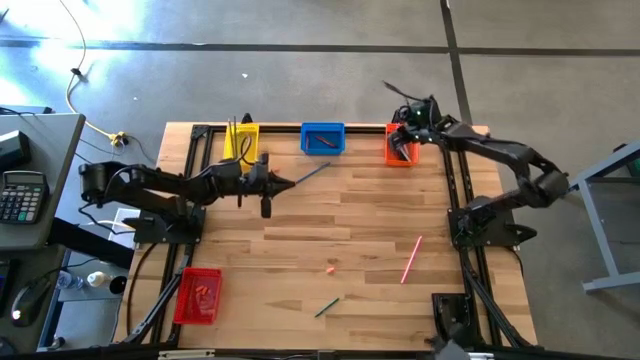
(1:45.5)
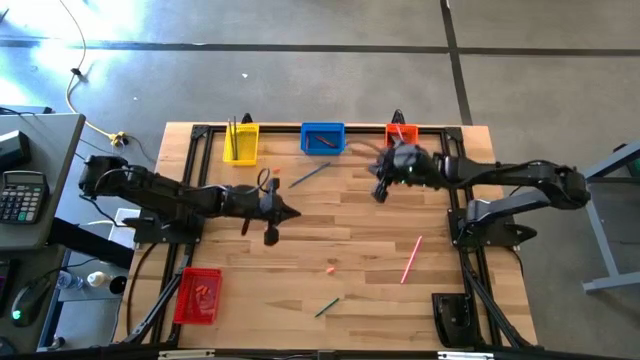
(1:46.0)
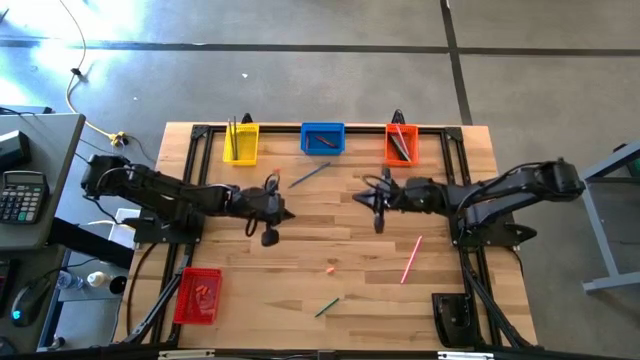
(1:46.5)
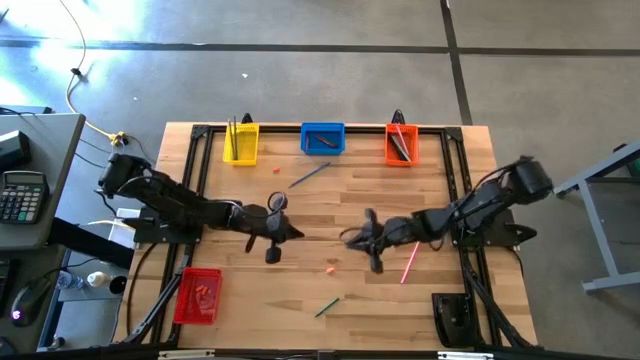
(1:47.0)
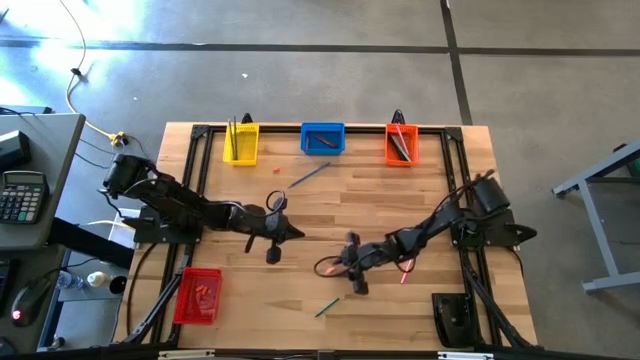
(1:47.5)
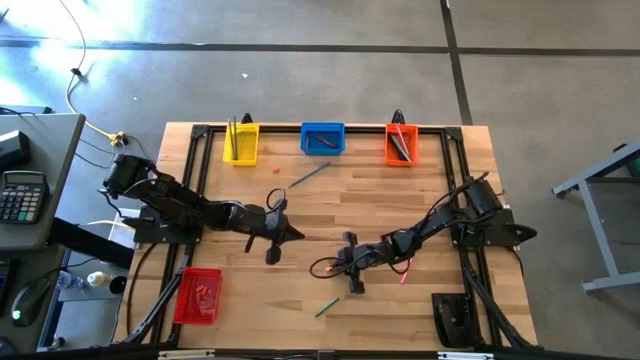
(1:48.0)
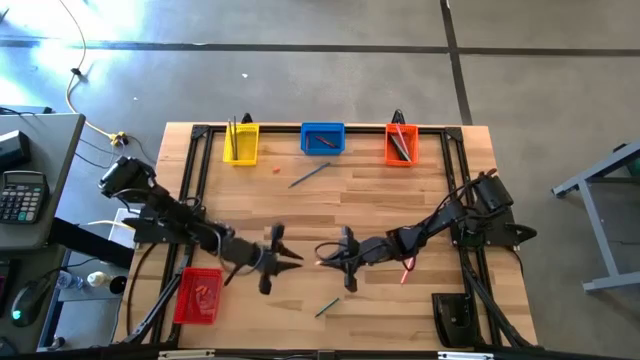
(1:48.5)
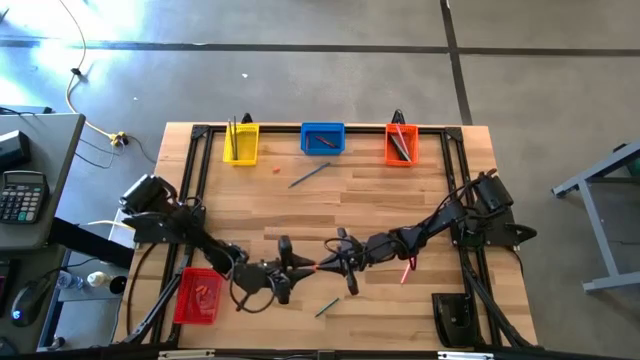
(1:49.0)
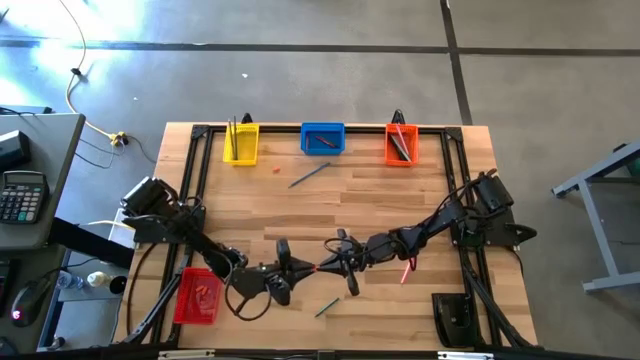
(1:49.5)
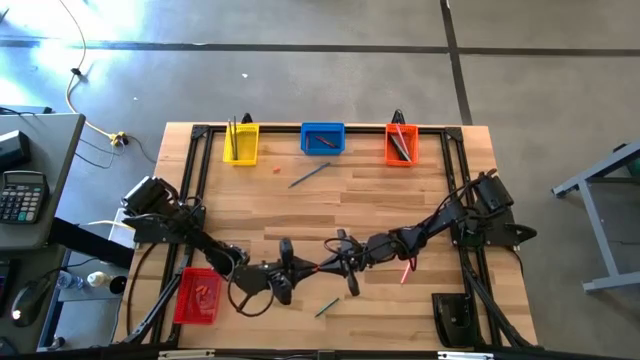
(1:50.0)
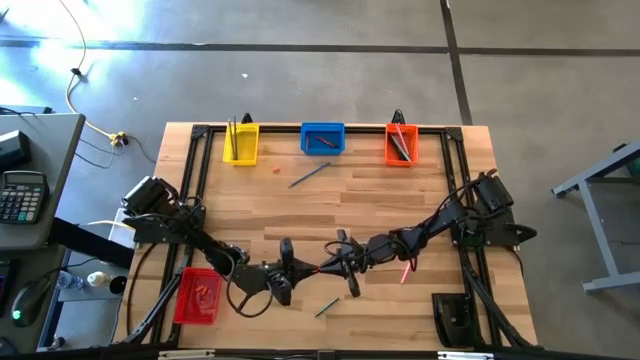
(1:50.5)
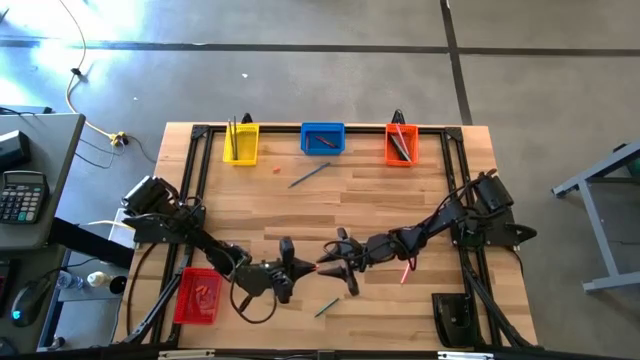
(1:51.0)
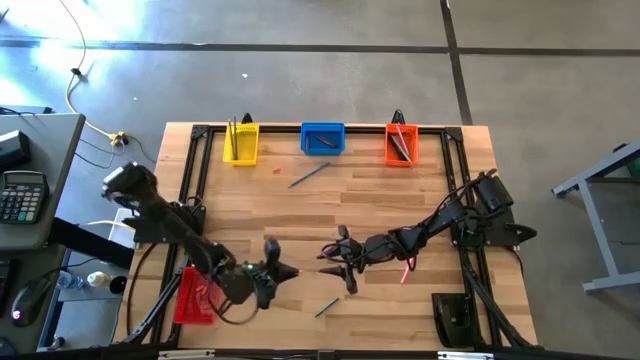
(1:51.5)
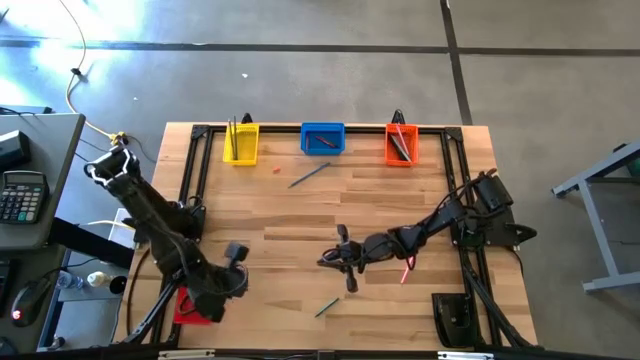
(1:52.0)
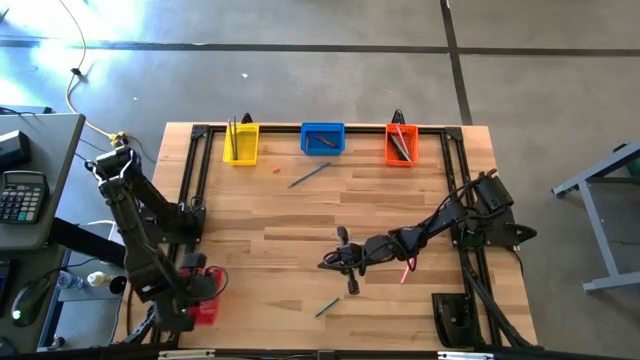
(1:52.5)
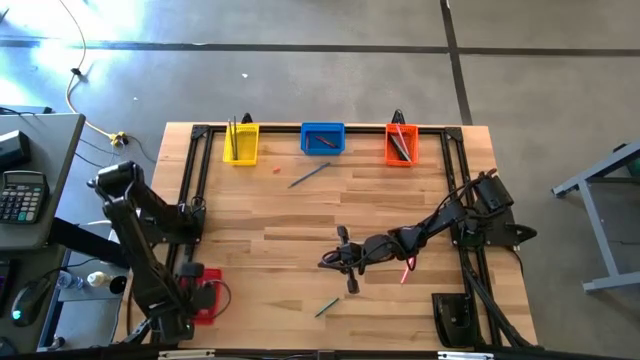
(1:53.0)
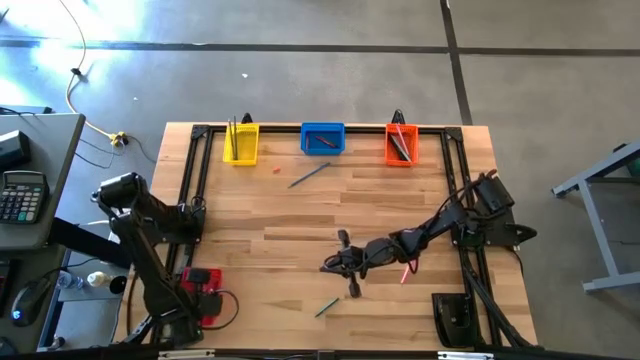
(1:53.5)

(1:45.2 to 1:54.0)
Task: Sort crayons/erasers/pens/pencils in bins
Put the orange eraser into the red bin

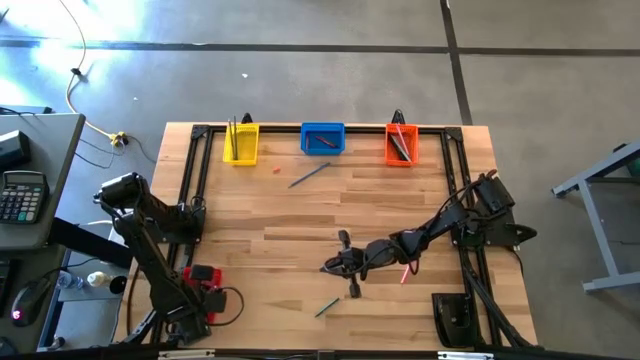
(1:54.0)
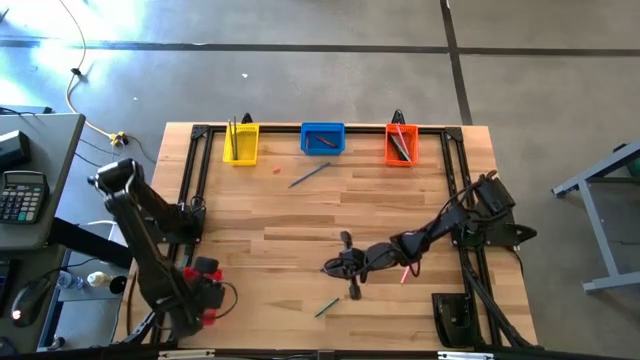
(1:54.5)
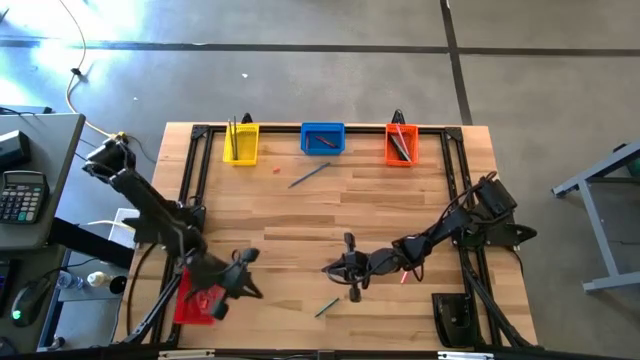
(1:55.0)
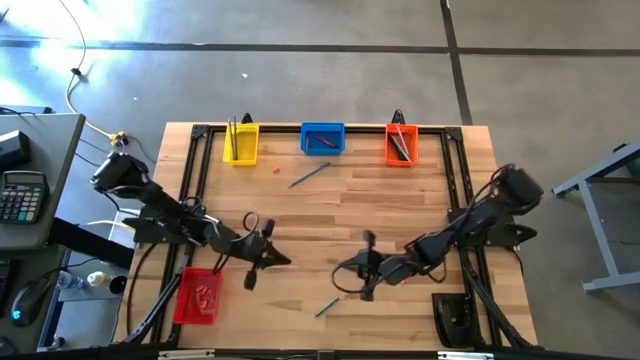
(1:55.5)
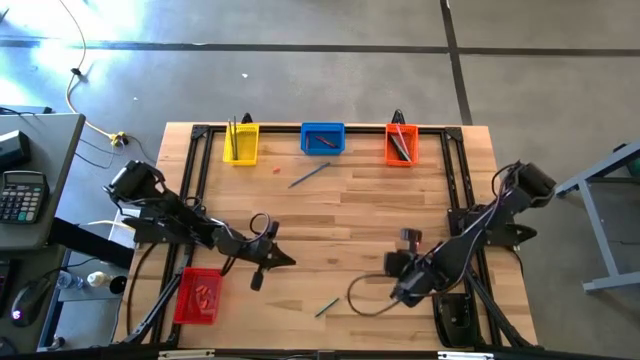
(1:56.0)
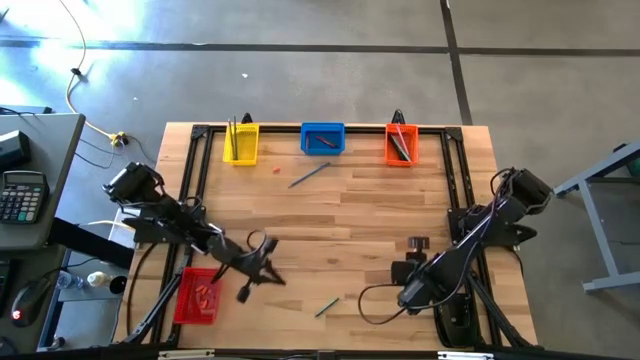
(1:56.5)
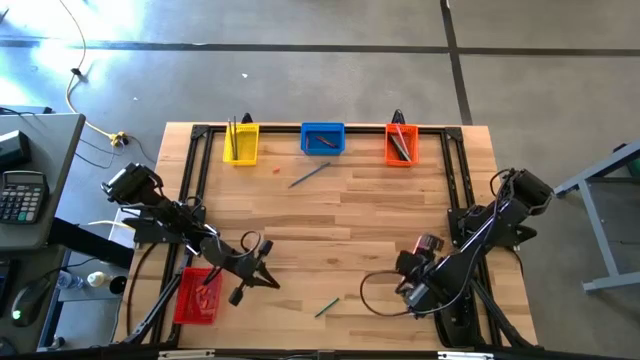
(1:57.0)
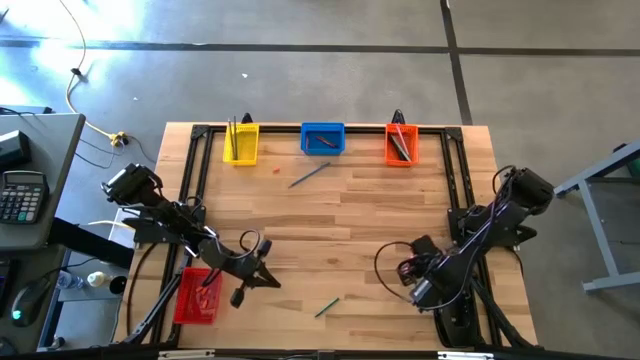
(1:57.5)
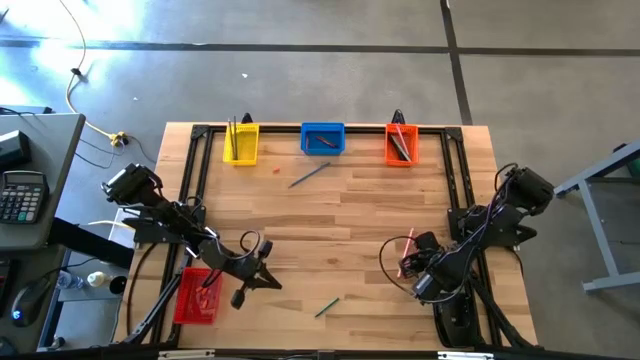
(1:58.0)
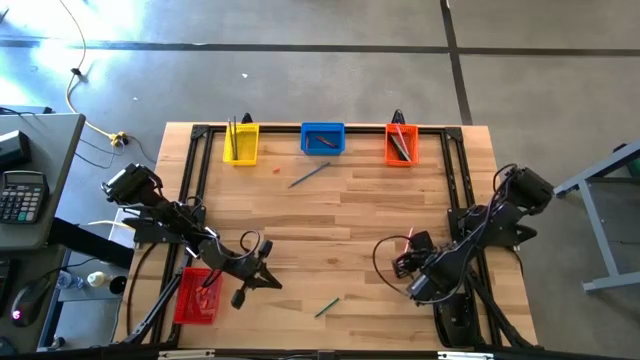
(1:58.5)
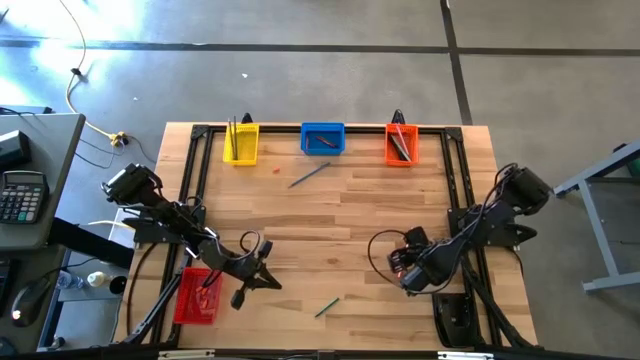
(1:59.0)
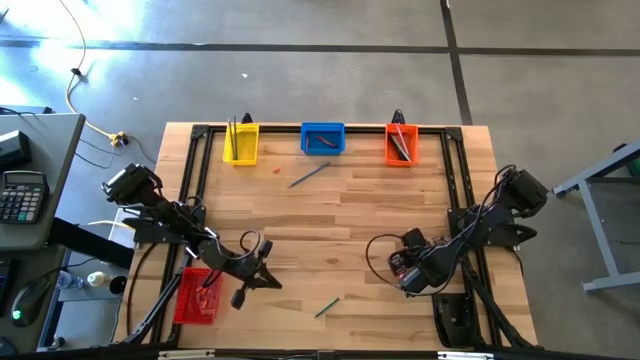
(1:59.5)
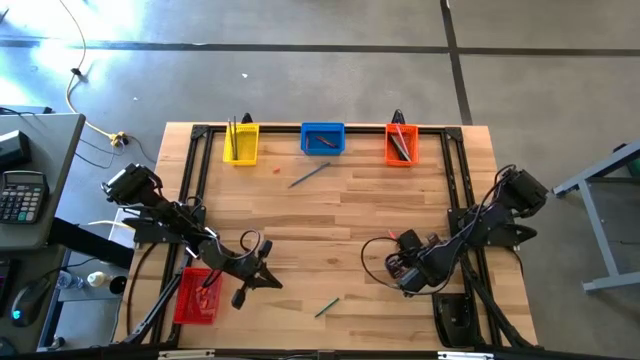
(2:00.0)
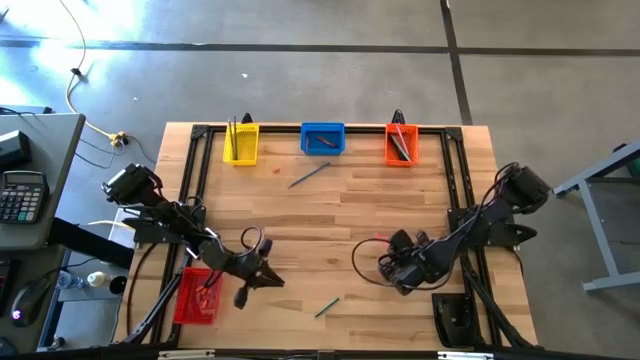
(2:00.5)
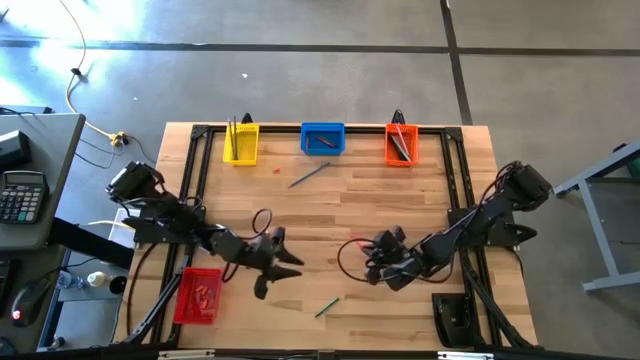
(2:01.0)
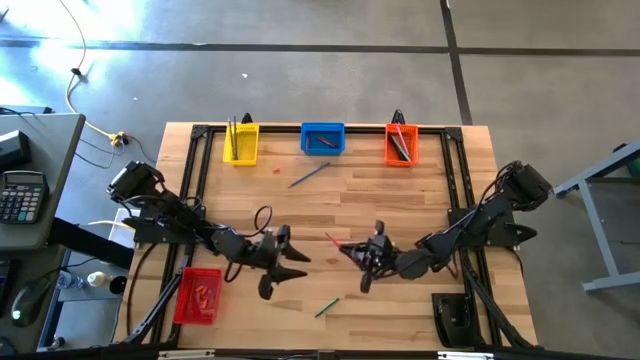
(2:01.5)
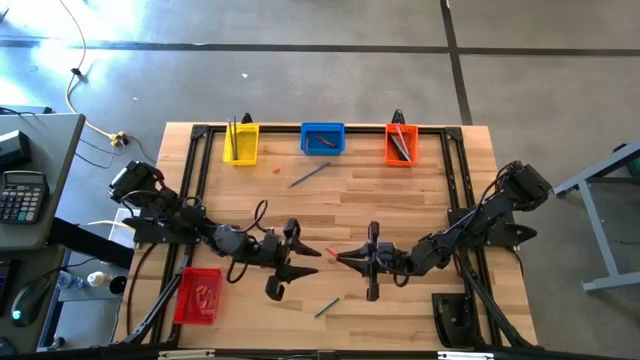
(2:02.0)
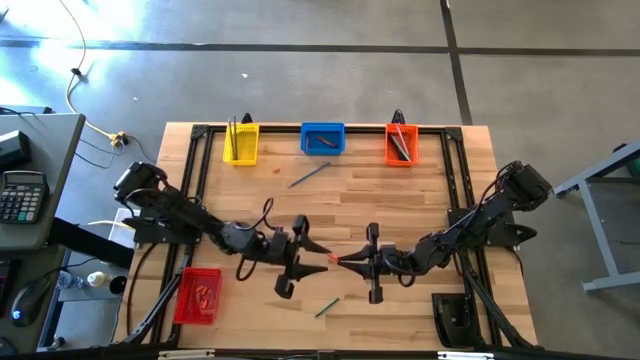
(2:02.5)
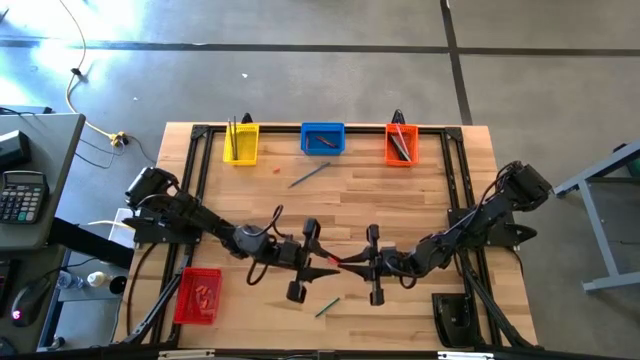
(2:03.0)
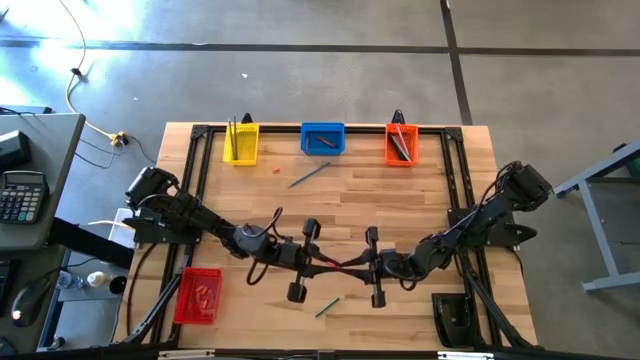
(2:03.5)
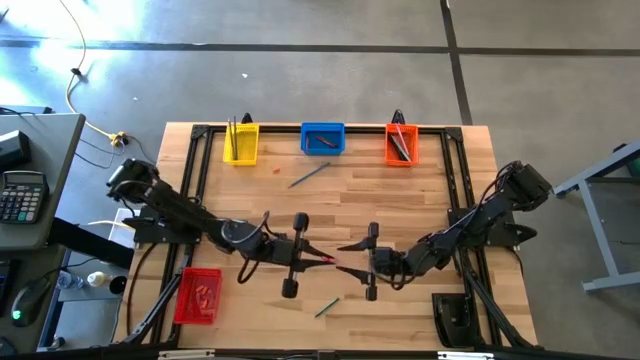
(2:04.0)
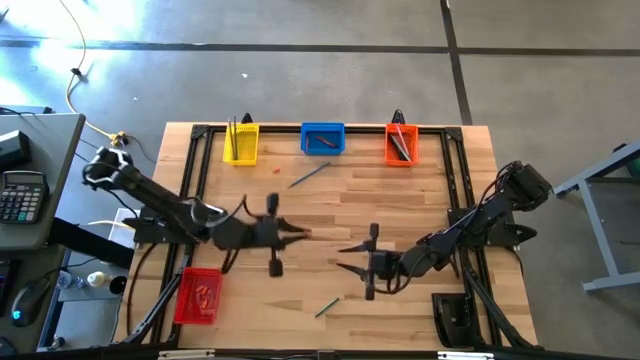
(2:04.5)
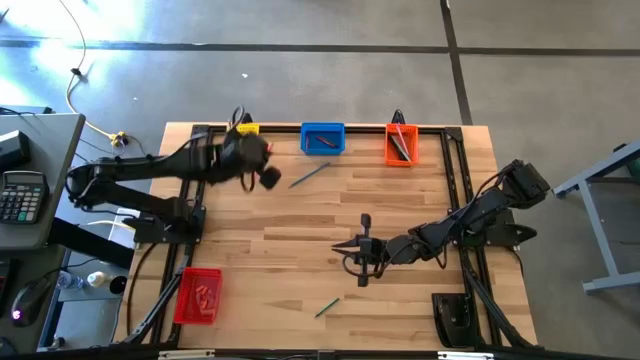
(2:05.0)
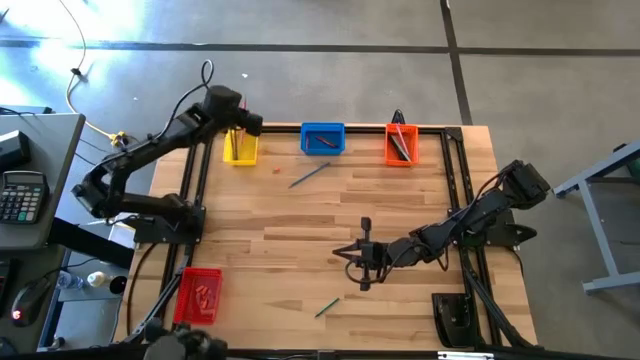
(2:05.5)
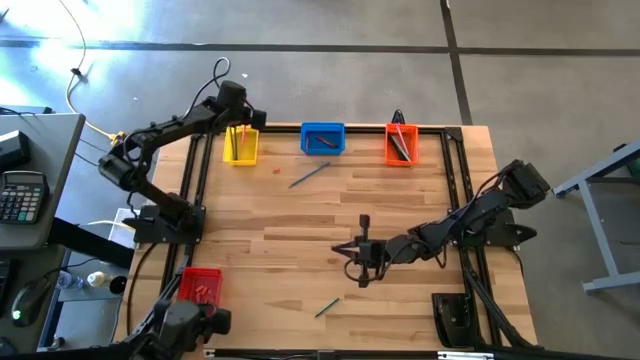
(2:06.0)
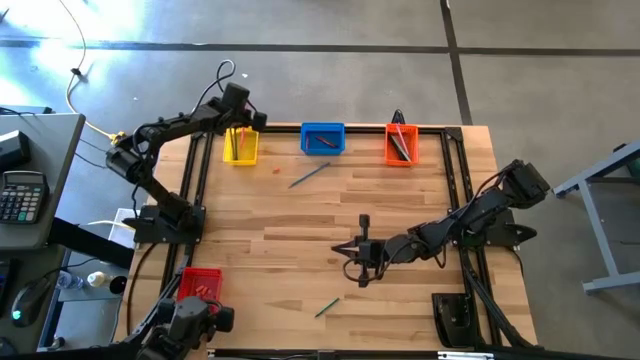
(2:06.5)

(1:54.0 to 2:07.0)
Put the pink colored pencil into the yellow bin
